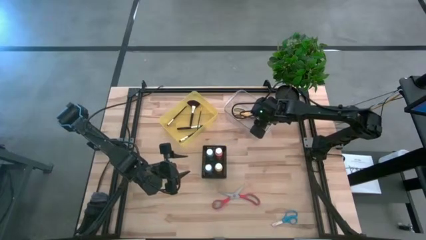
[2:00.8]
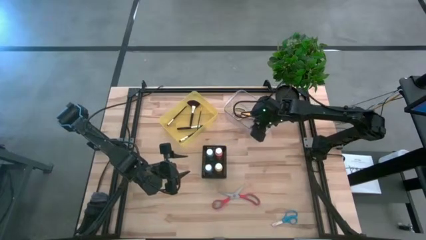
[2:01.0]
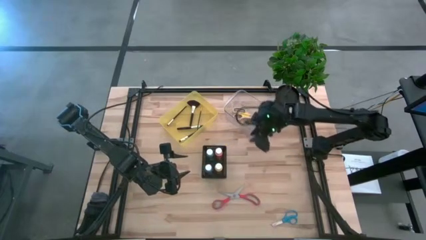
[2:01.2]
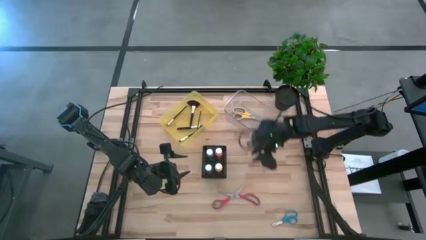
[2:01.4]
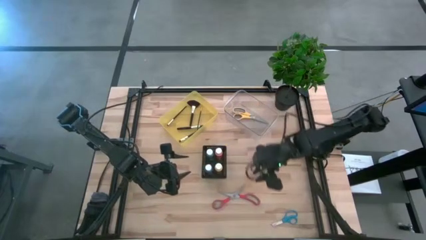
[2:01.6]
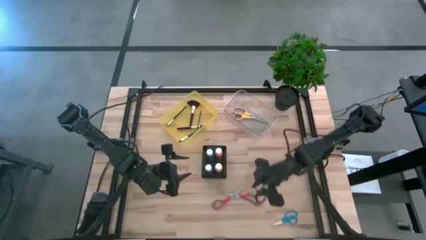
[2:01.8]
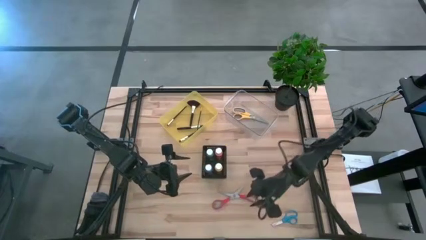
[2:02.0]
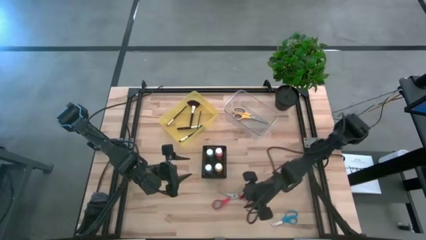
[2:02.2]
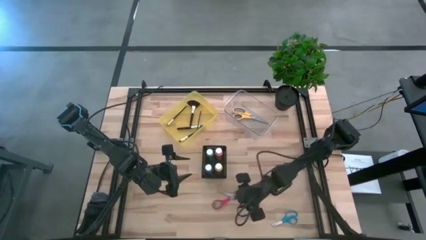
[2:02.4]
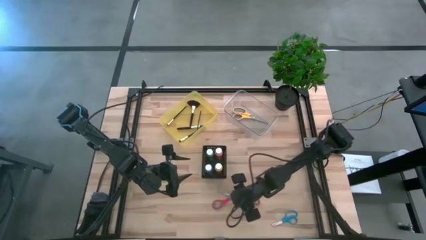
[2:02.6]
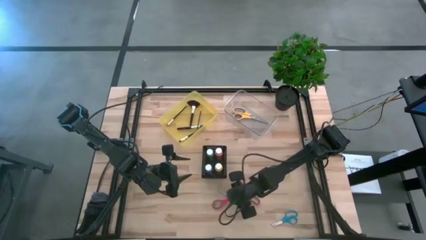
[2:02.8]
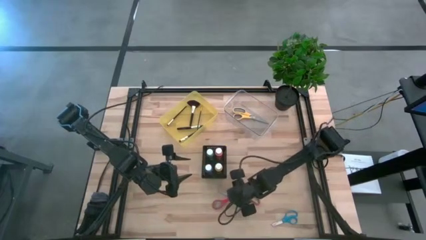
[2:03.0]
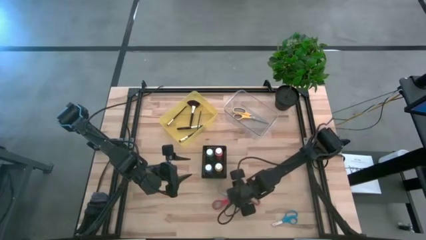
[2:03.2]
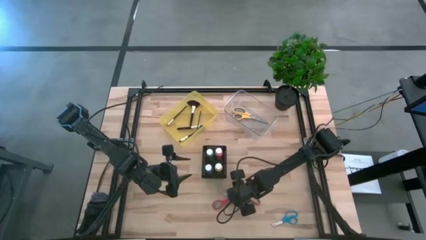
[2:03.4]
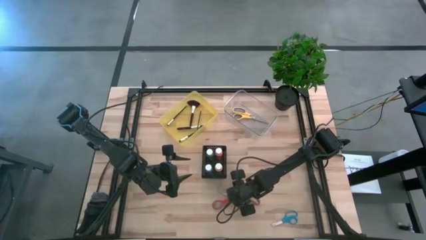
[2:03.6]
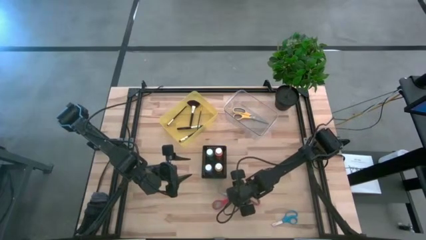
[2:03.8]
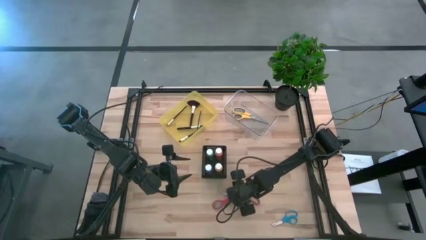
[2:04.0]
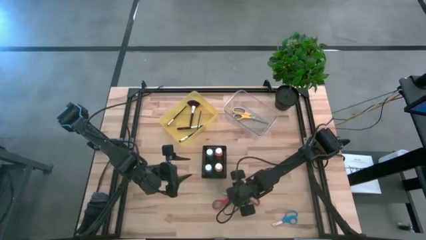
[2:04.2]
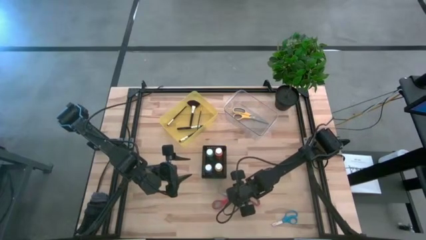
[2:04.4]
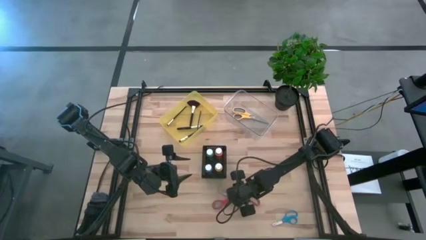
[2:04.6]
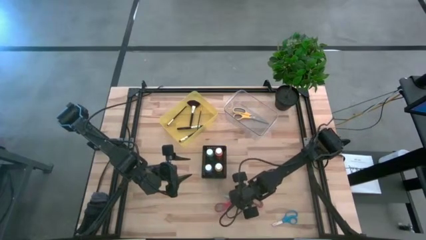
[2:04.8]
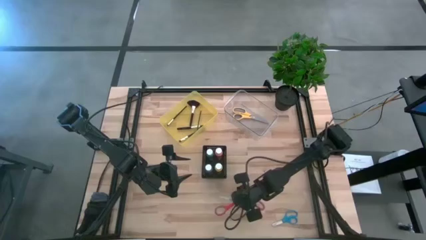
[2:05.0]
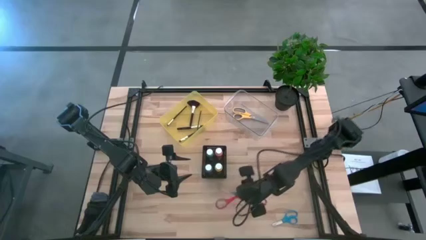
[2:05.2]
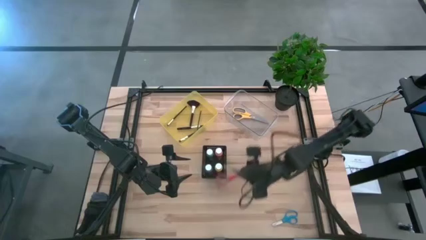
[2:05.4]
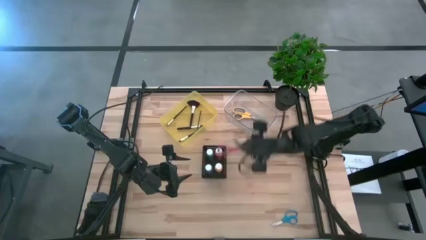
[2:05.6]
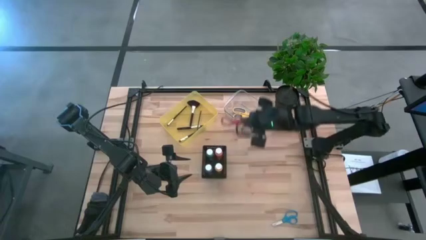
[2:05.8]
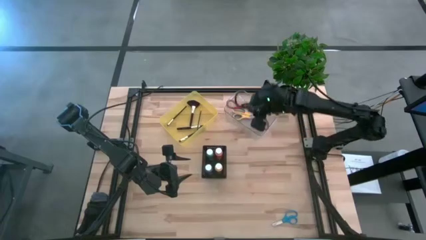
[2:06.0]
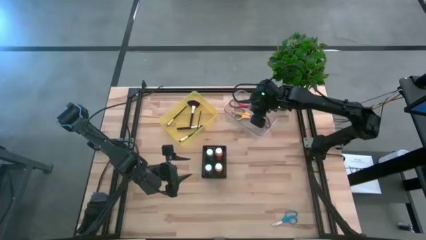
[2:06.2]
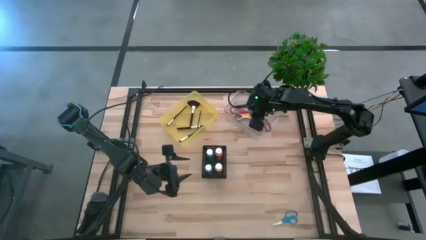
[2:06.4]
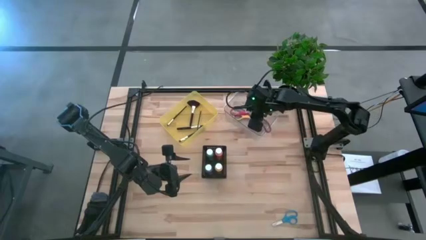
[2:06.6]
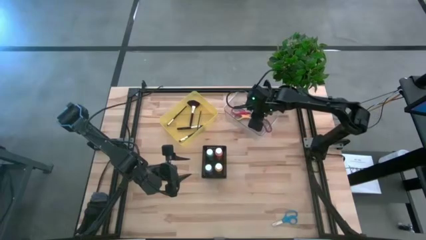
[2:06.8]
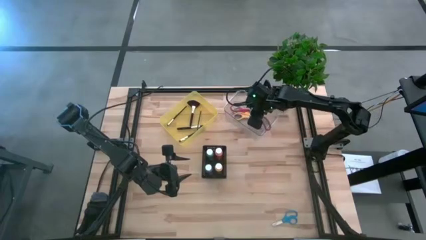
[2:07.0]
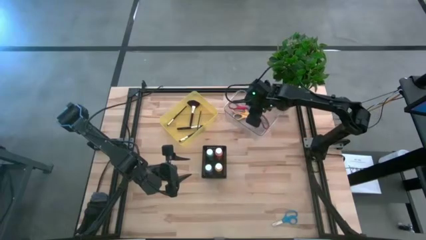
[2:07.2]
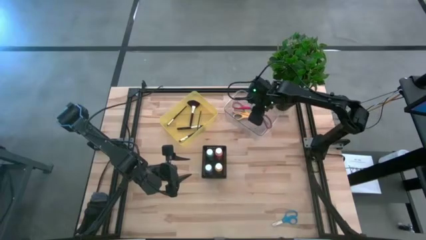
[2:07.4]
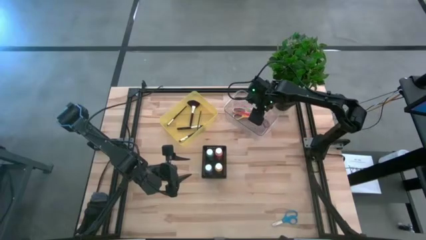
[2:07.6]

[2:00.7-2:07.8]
Task: Pick & Place Paint Supplies
Put the red scissors into the transparent bin

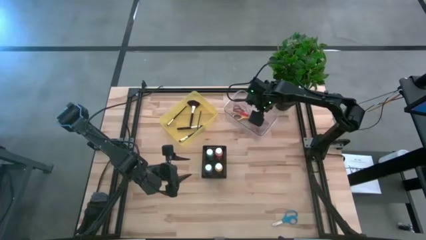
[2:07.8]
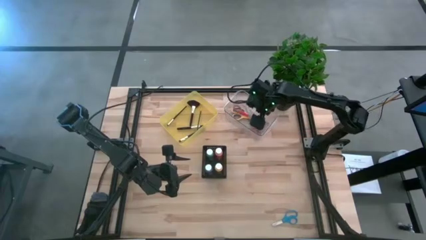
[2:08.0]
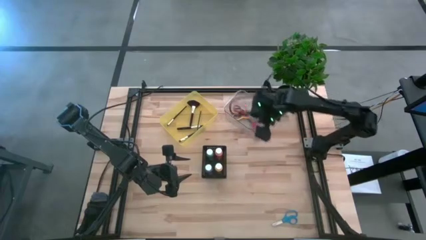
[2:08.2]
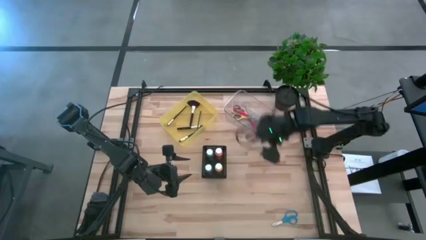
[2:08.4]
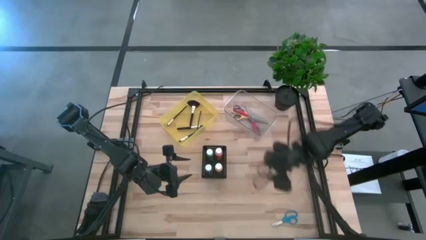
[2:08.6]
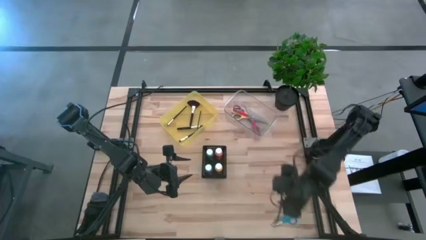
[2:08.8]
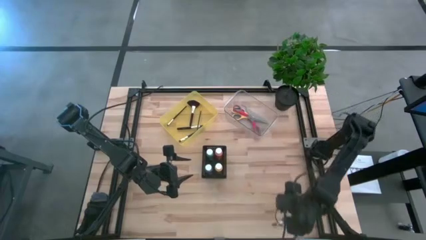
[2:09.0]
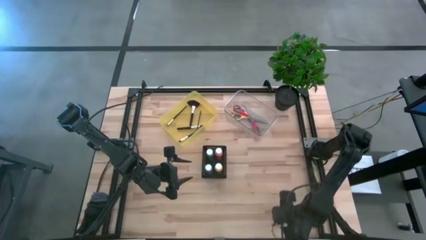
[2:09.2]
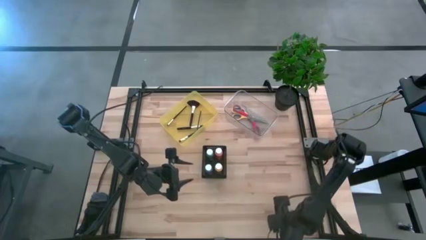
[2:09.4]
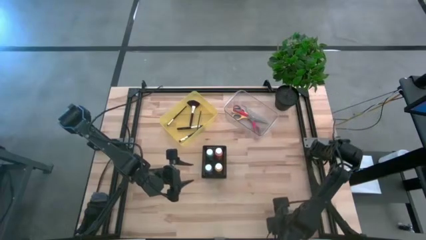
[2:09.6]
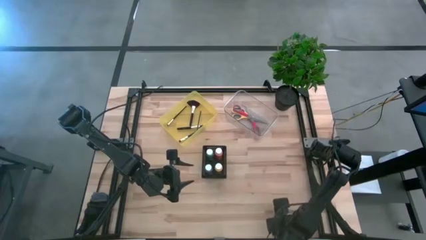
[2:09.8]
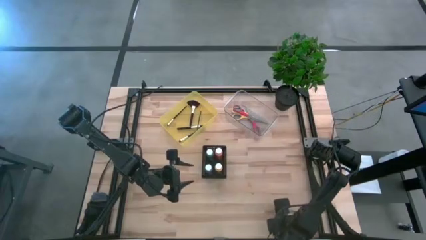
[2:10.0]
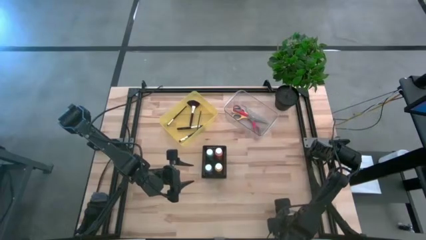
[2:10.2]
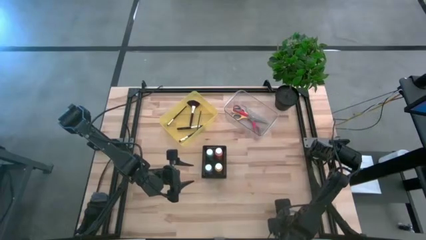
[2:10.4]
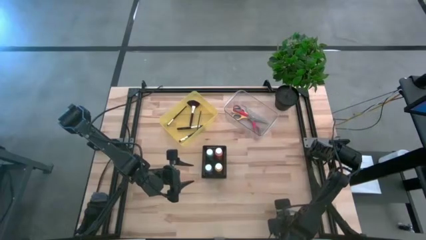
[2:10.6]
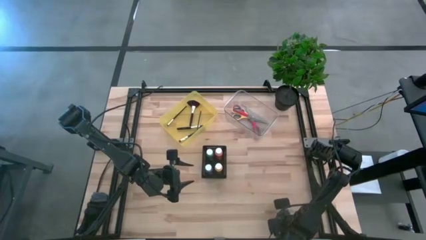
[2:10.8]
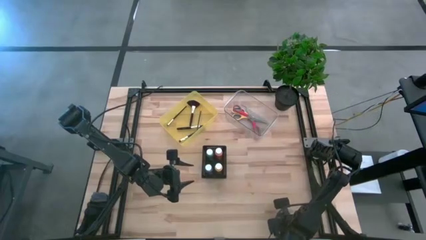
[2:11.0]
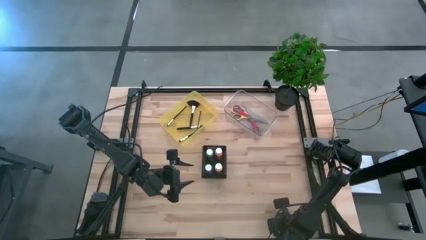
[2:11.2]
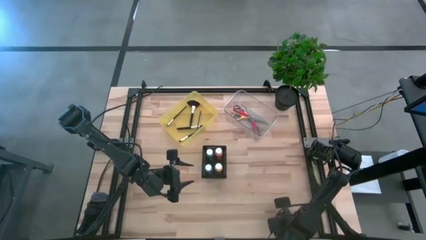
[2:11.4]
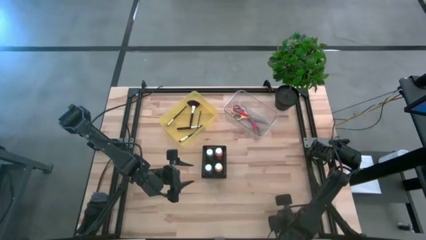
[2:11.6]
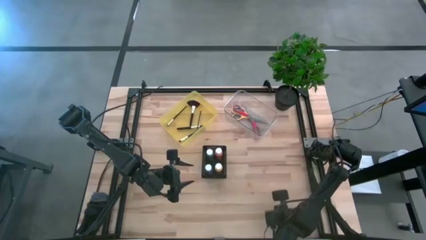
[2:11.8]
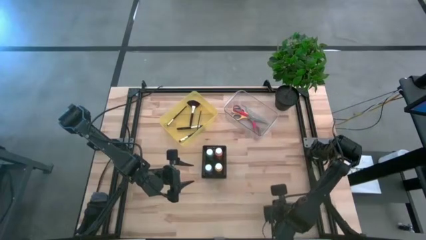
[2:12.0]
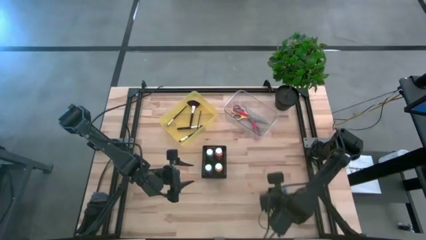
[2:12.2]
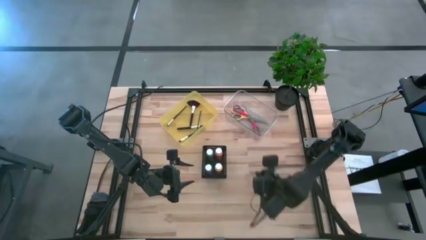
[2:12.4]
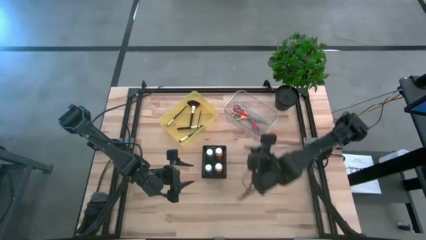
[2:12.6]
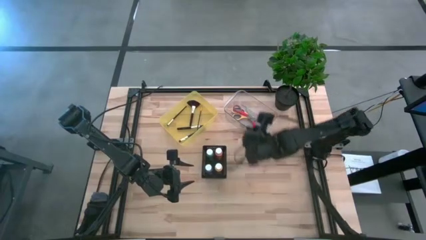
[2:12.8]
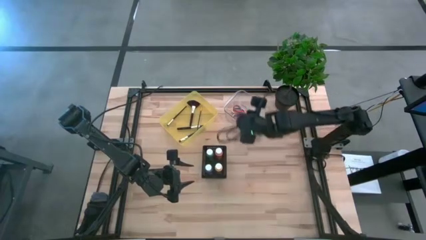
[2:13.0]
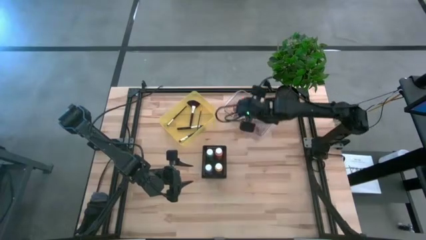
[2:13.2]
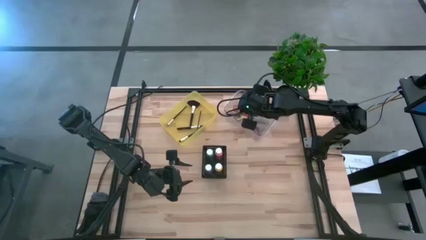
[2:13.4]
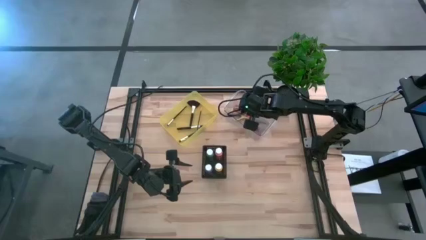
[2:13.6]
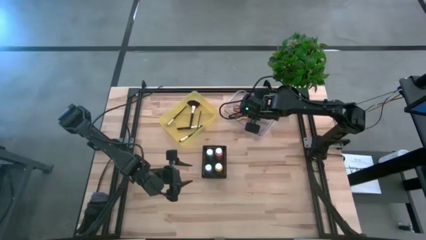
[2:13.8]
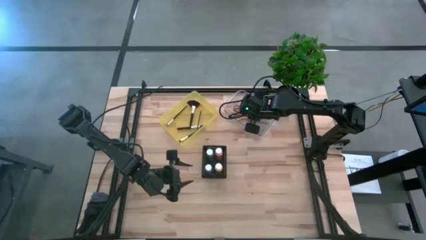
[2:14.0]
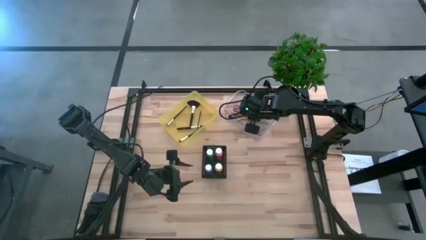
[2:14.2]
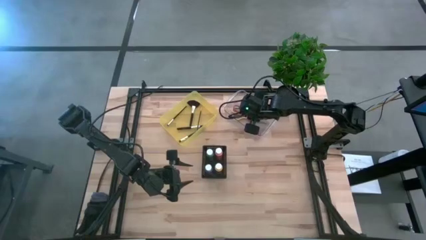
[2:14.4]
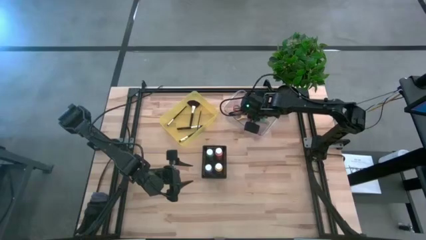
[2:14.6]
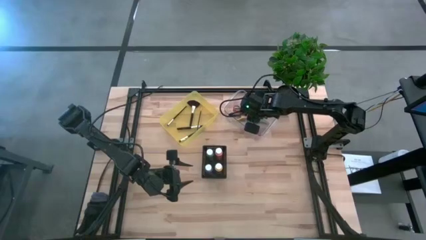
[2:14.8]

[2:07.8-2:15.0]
Put the blue scissors into the transparent bin
